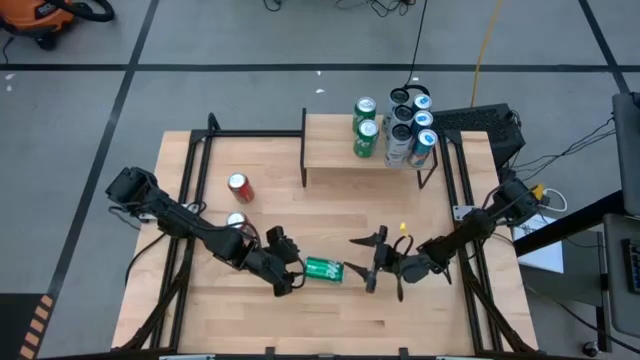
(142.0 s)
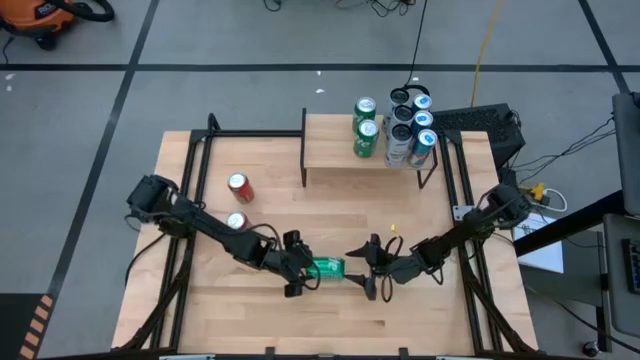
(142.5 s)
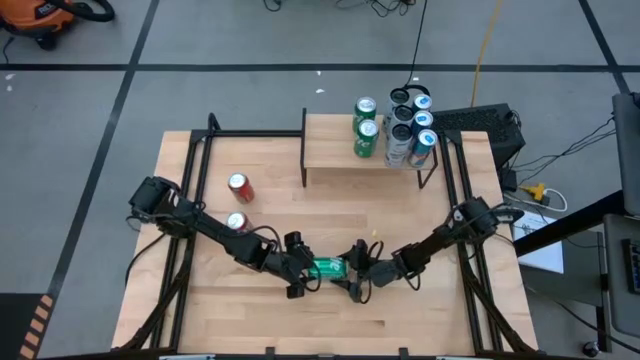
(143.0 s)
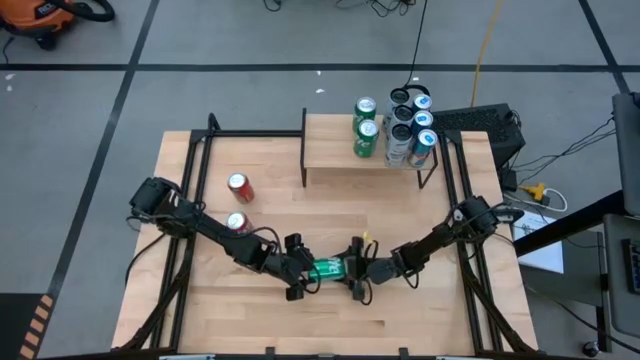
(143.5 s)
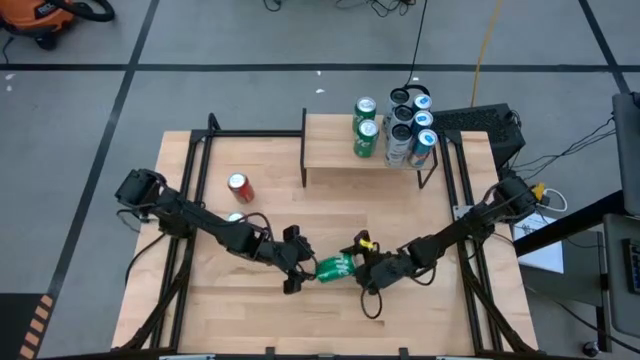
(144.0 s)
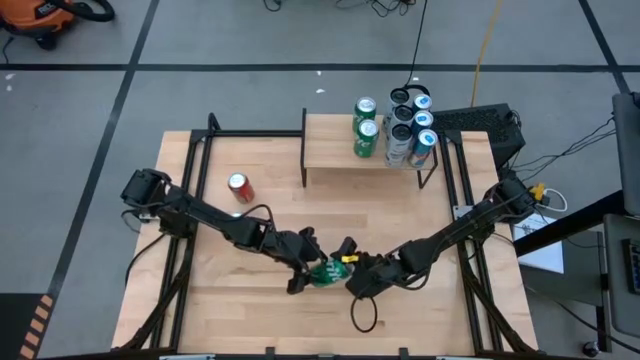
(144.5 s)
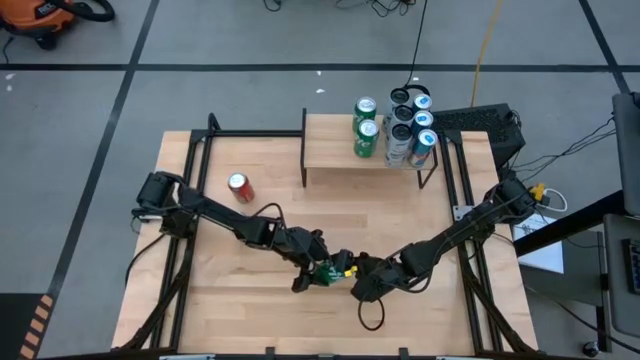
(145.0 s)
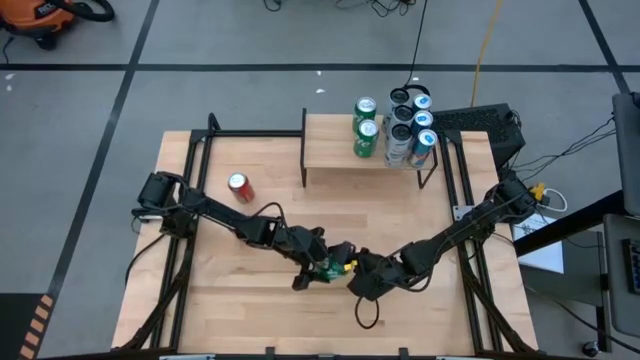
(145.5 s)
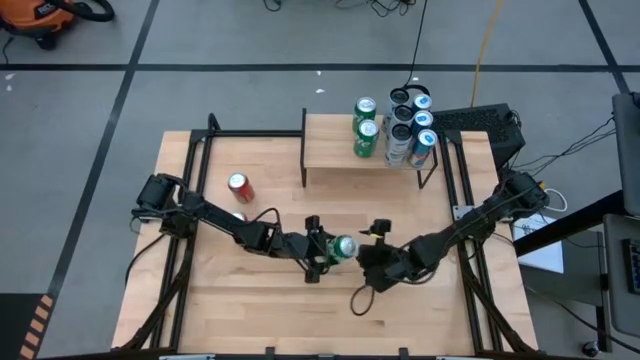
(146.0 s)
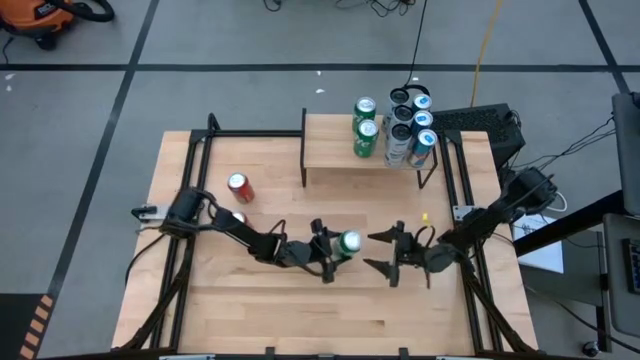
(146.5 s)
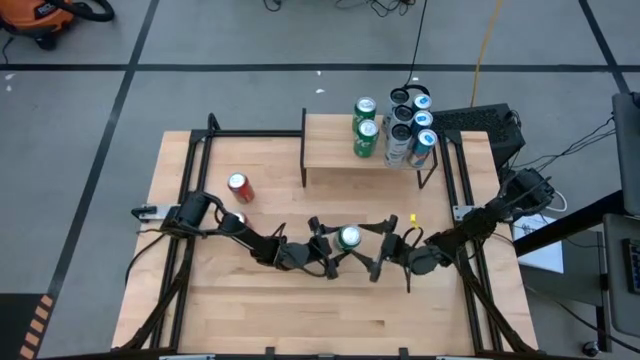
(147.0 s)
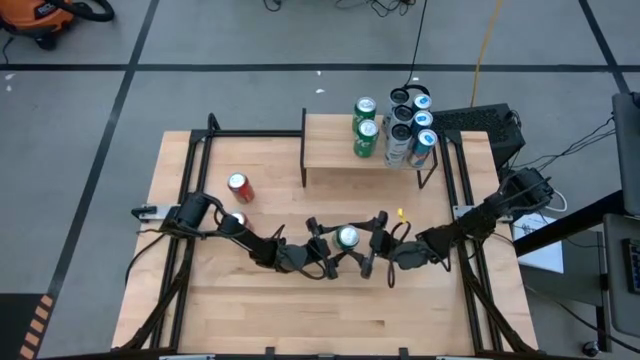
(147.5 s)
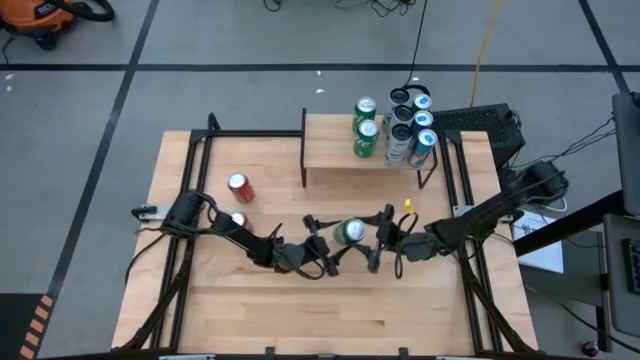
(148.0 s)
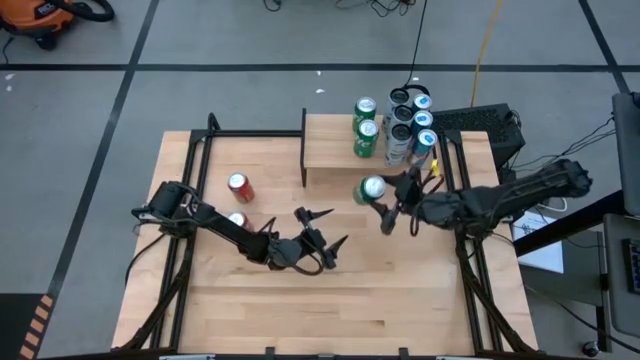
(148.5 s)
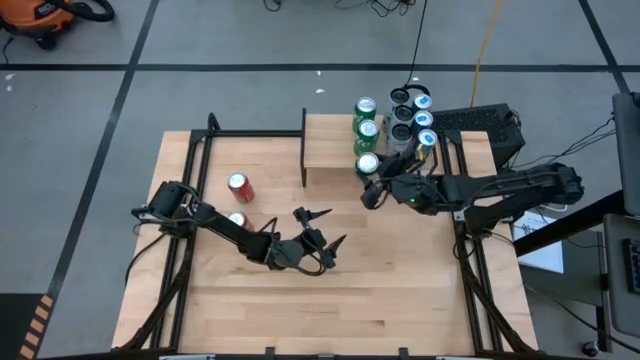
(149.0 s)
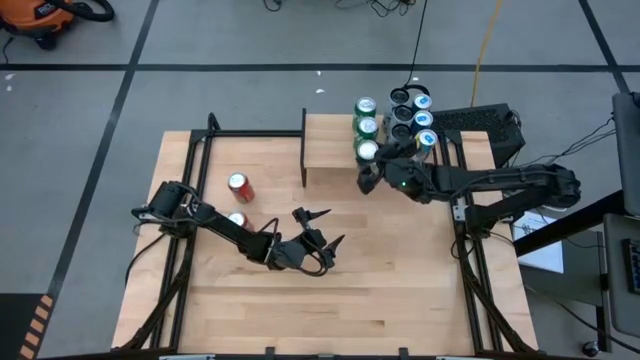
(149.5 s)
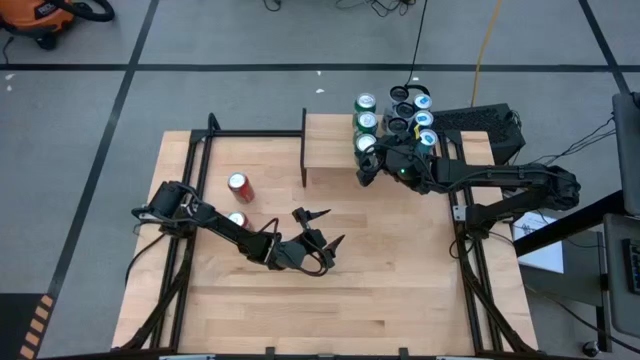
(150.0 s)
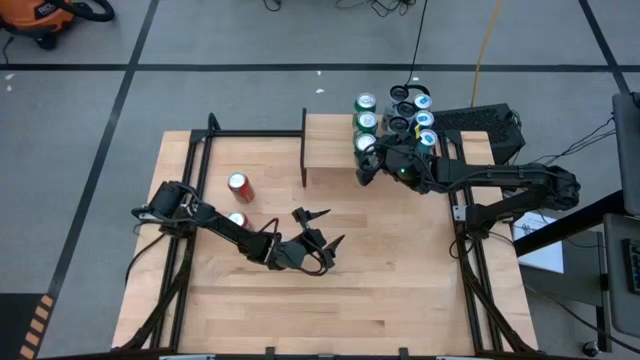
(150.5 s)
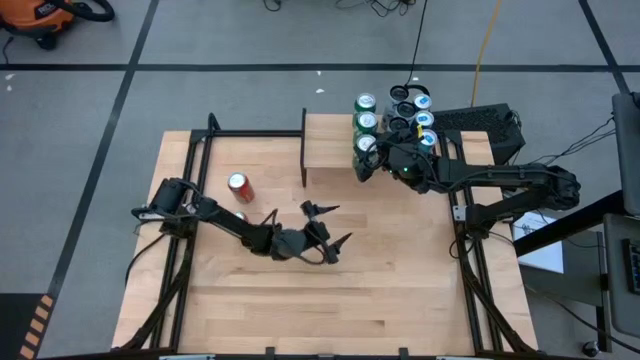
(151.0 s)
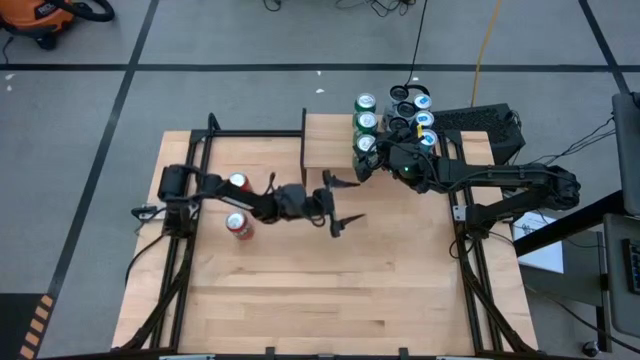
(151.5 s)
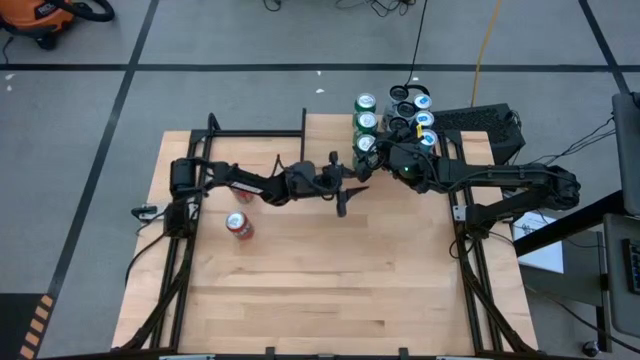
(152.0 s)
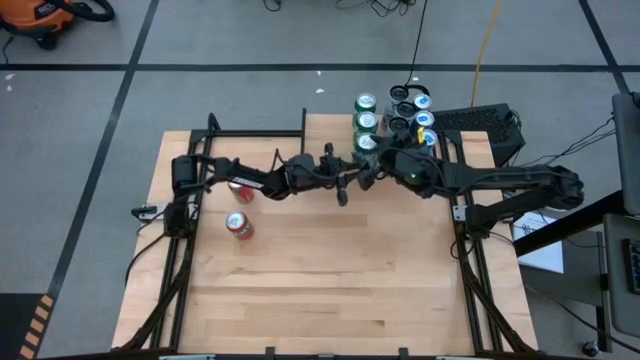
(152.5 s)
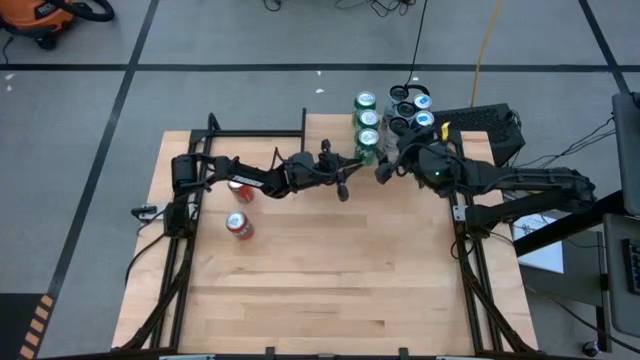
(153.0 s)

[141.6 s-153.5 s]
Task: Place canned beverage on shelf
Put the green soda can on the shelf aligned with the other green soda can

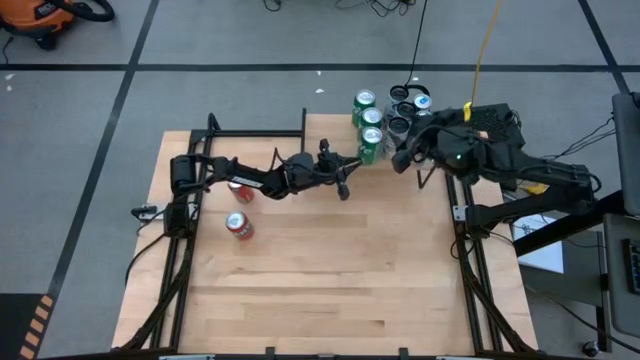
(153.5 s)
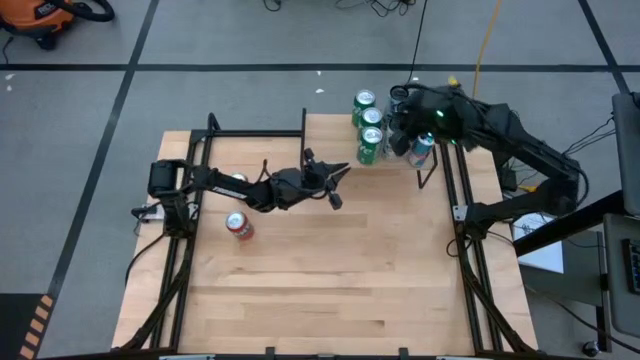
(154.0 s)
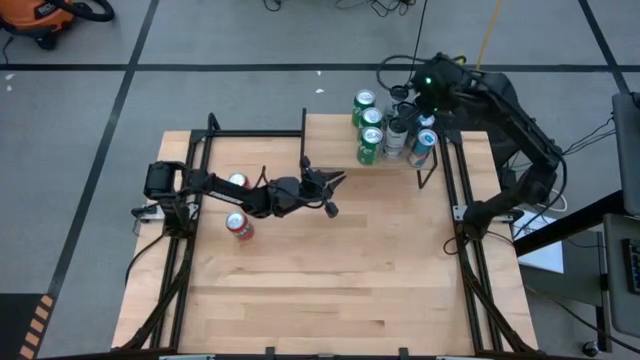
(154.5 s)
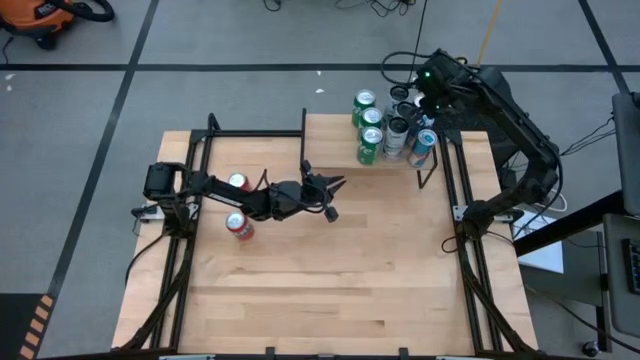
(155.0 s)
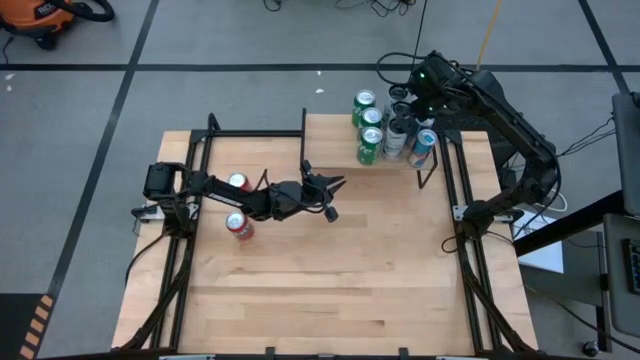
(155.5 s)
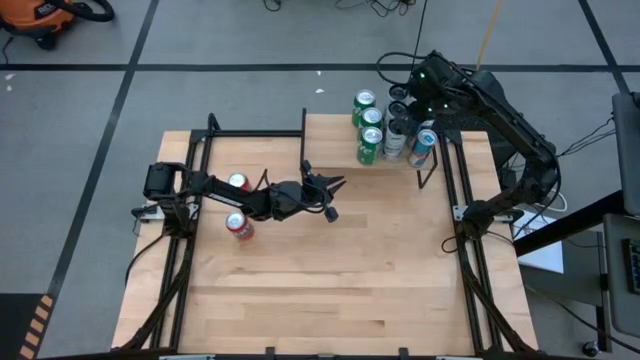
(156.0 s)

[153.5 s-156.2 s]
Adjust the white blue soda can on the shelf

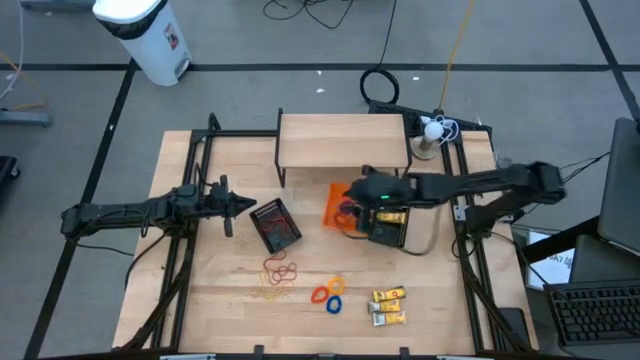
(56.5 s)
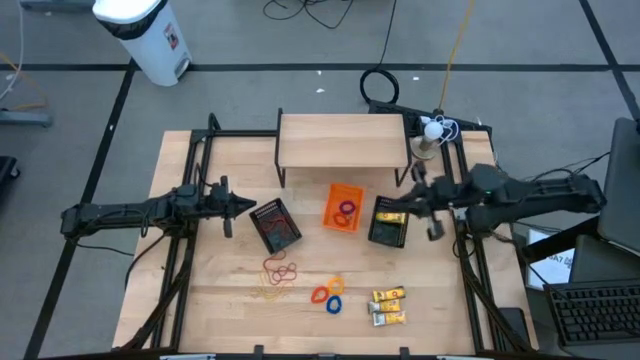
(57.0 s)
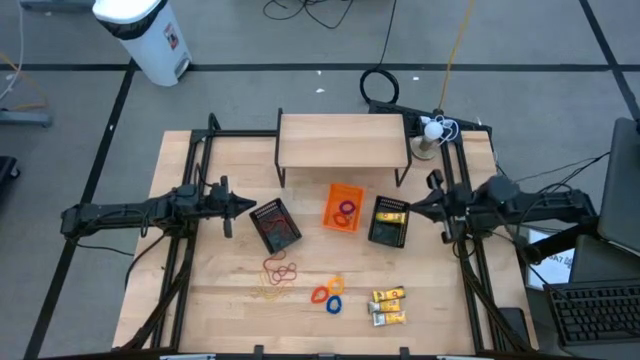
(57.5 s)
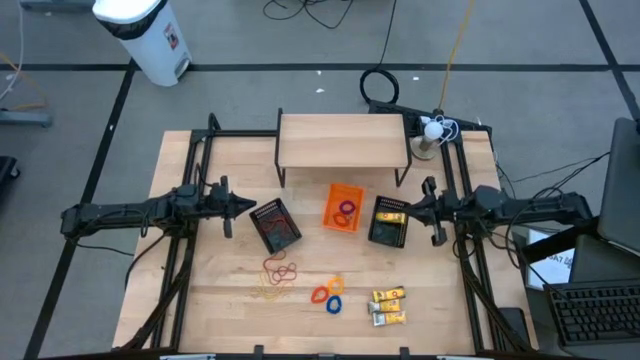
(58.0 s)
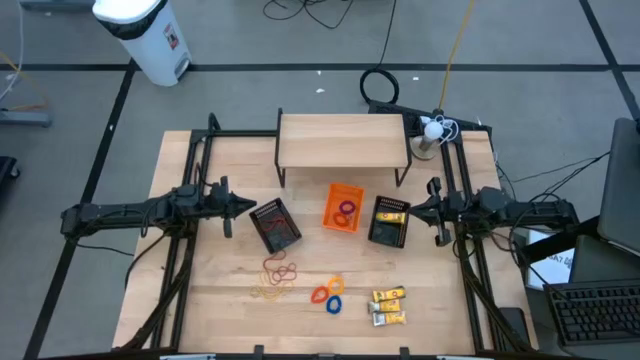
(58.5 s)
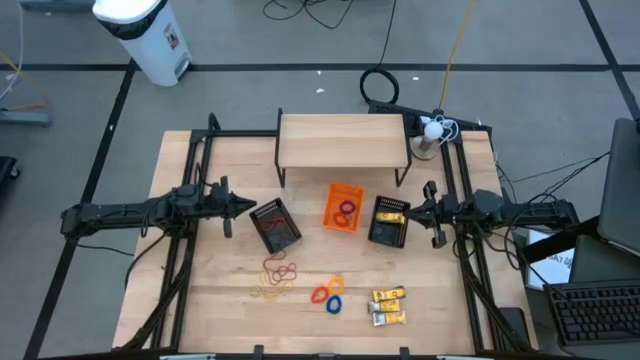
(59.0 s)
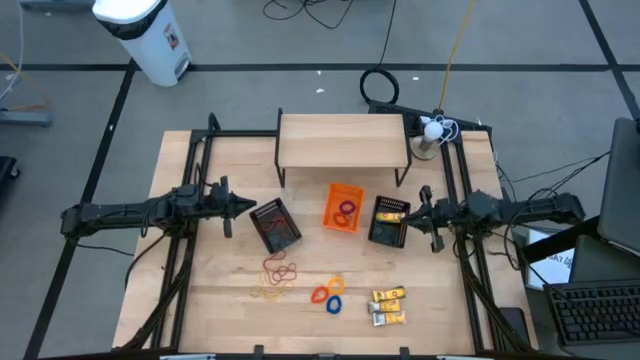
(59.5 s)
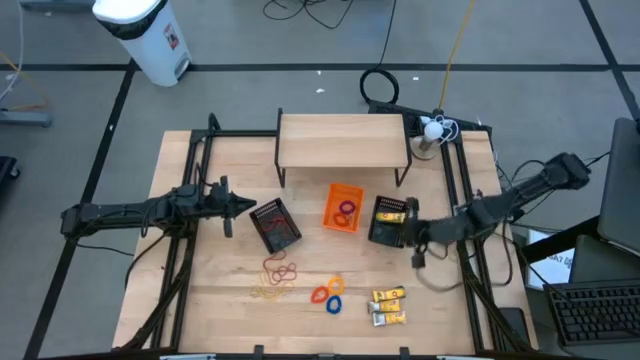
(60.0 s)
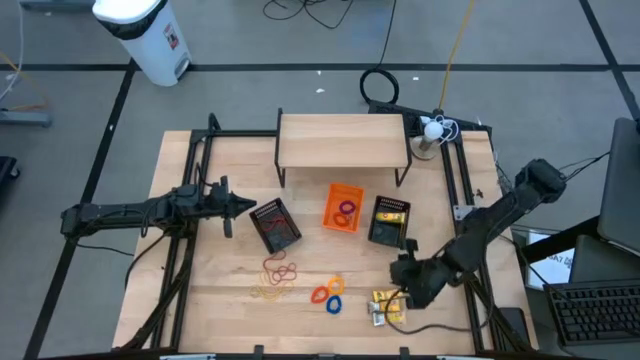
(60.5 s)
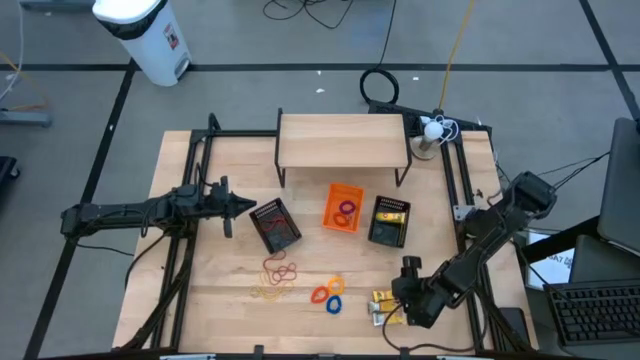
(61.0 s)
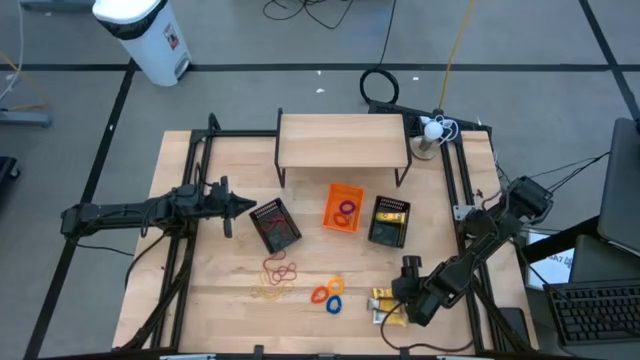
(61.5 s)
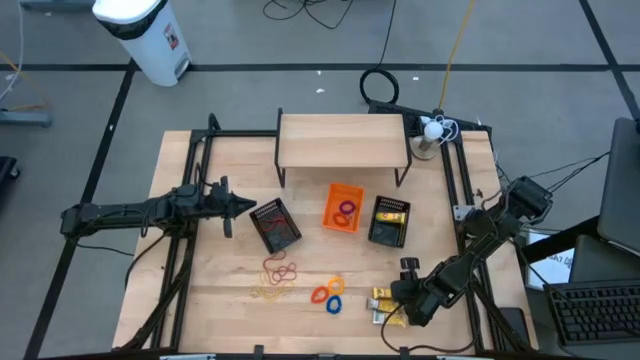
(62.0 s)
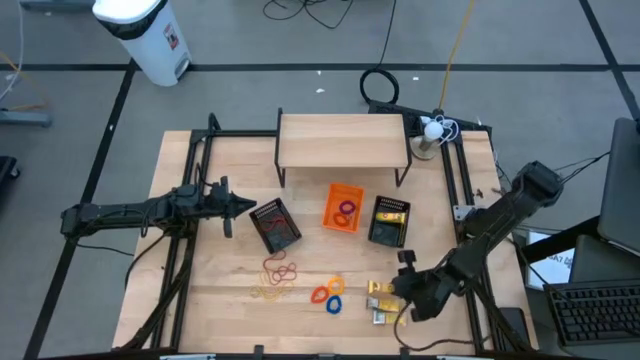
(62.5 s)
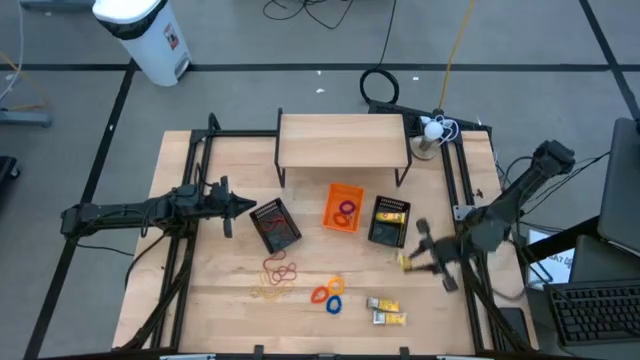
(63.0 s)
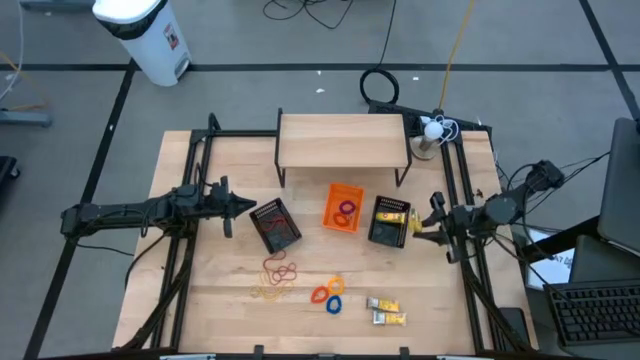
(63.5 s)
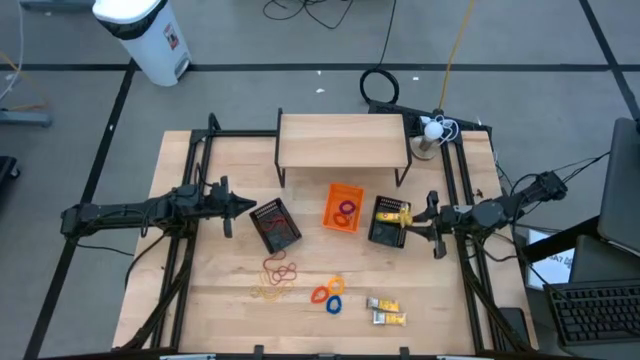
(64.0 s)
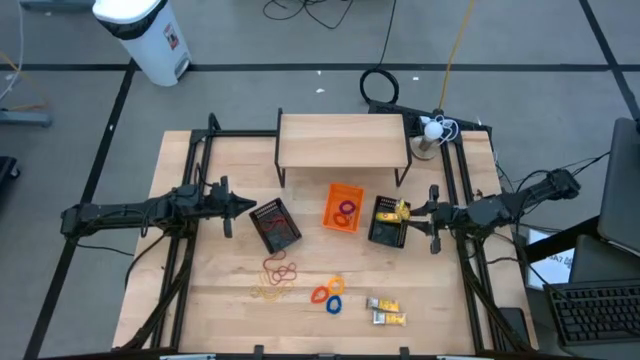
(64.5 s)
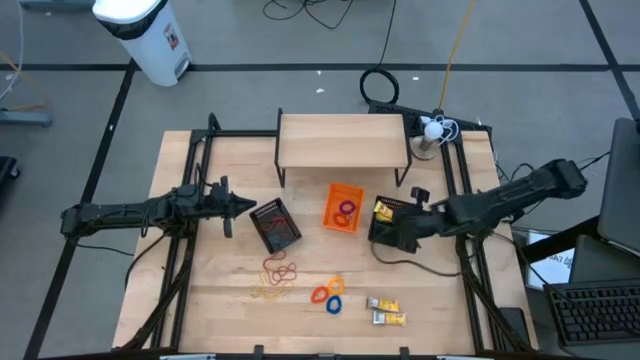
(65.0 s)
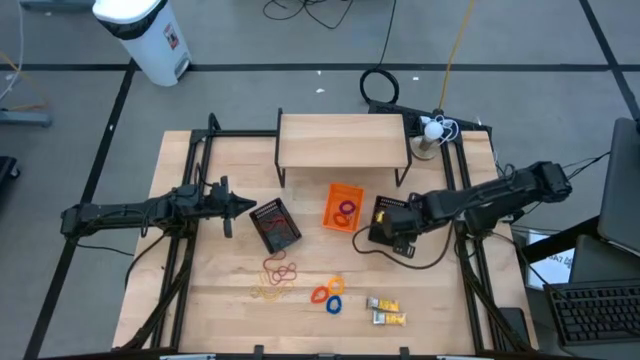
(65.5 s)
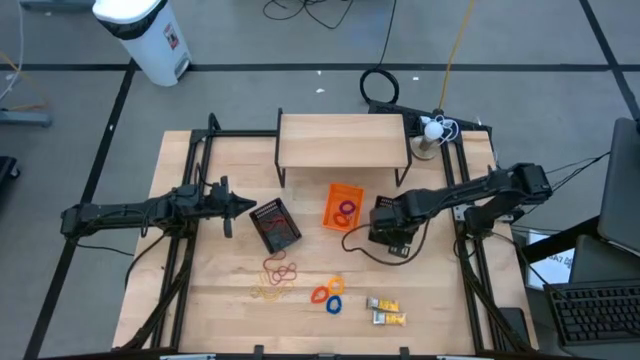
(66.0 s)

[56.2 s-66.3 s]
Task: Pick & Place Office Desk Supplies
Put the crayon box into the right black bin
